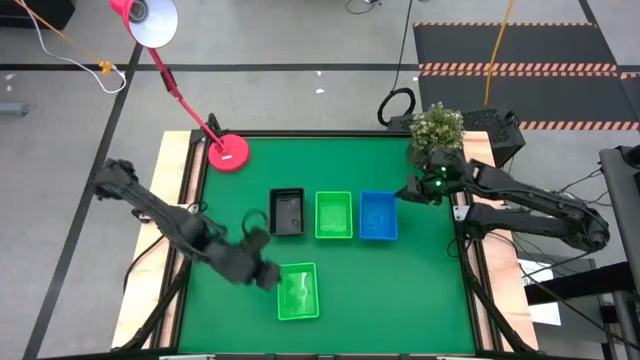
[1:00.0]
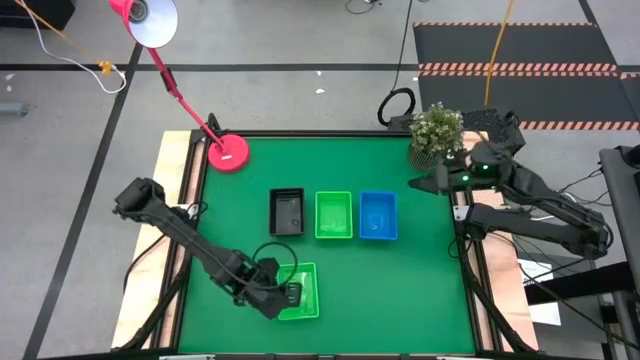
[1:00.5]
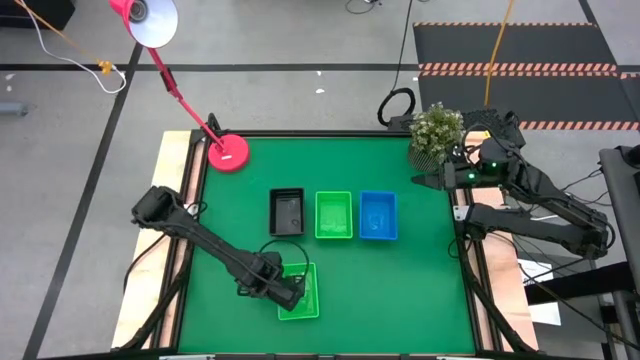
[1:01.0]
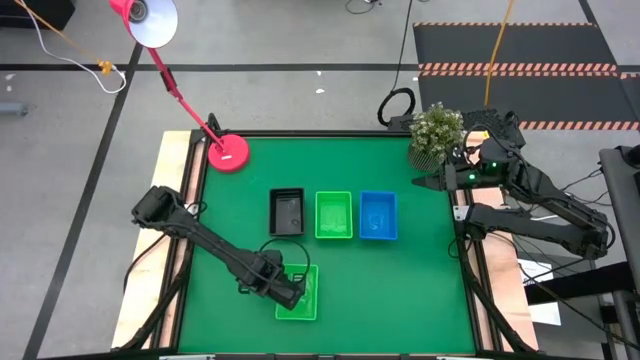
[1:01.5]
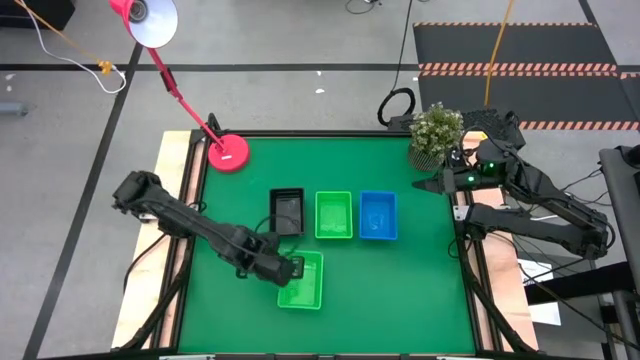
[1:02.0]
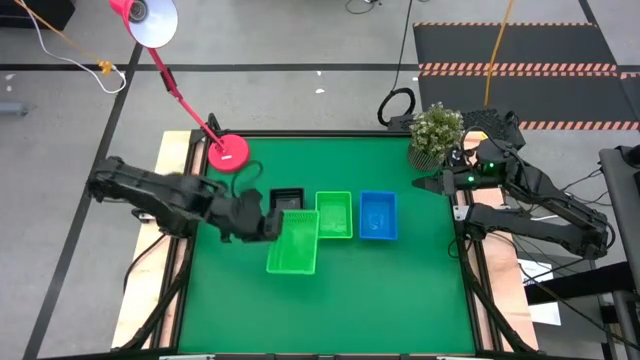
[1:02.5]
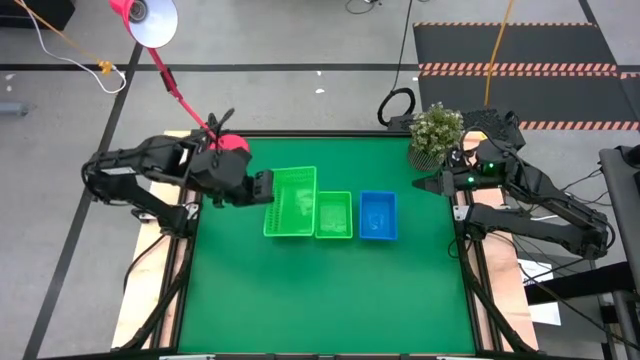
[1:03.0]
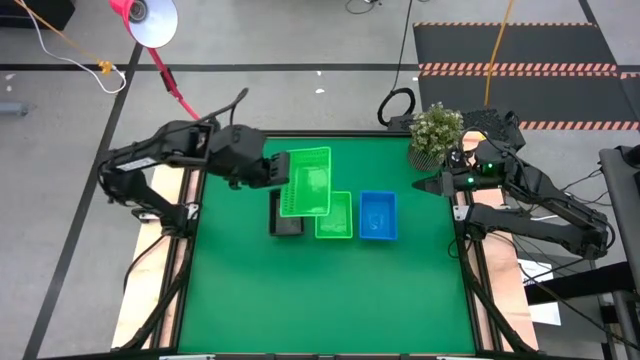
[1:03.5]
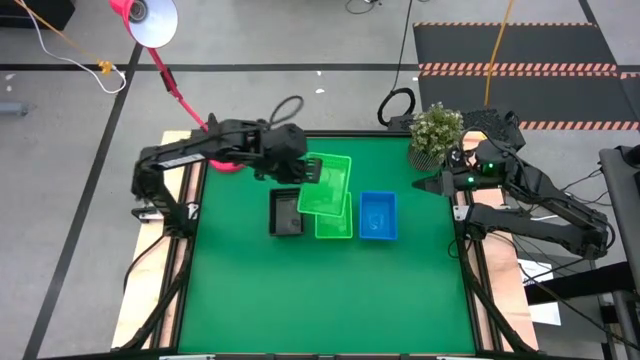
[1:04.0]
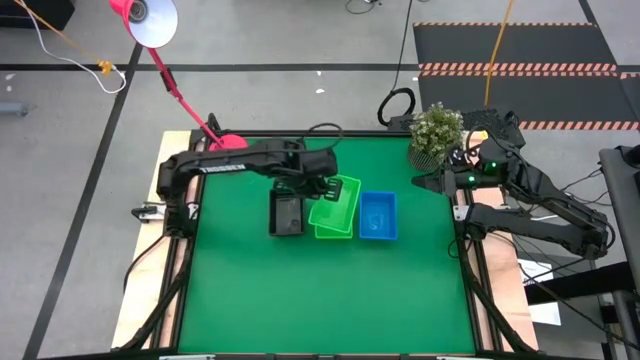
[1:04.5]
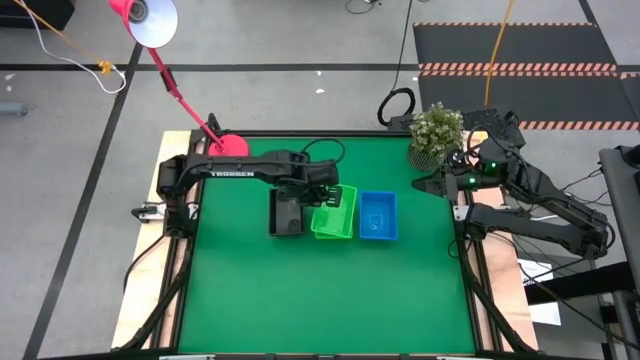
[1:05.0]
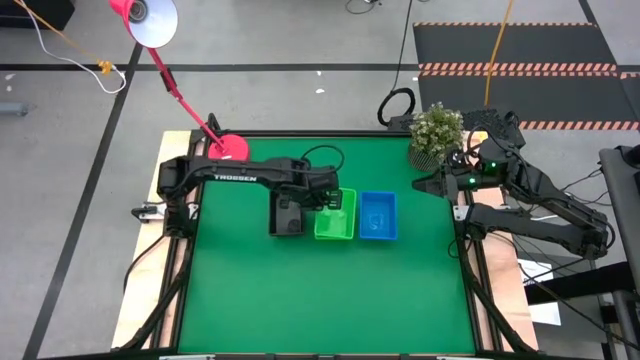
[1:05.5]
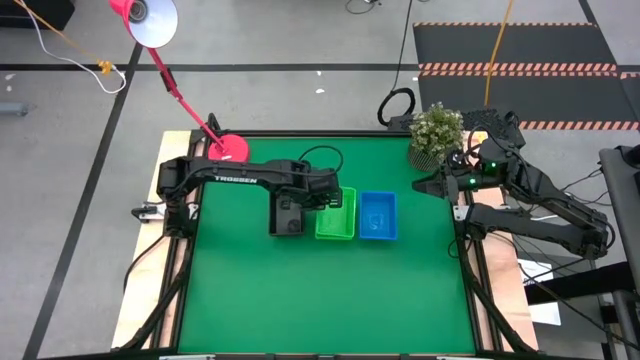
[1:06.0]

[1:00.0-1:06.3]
Stack the bottom green bin on the top green bin

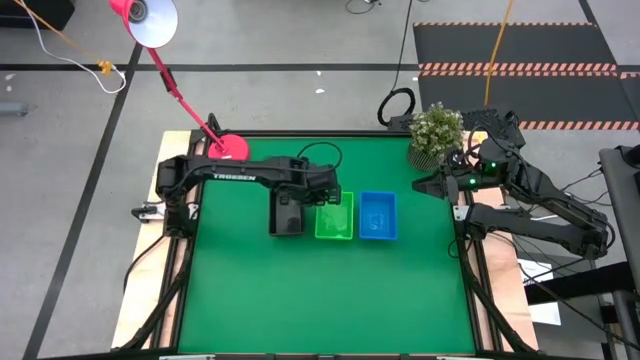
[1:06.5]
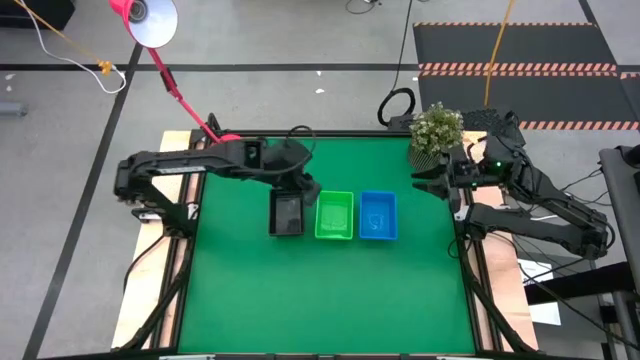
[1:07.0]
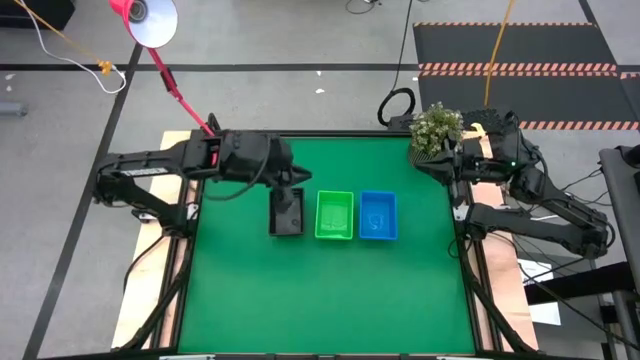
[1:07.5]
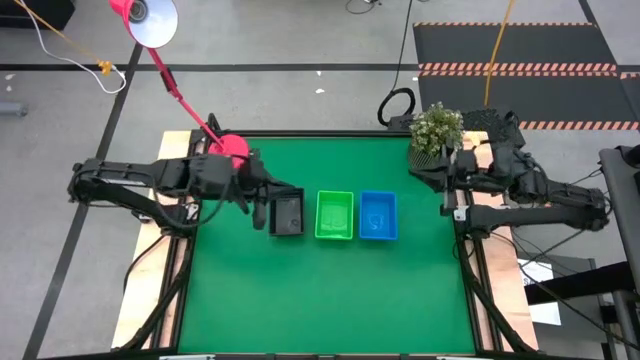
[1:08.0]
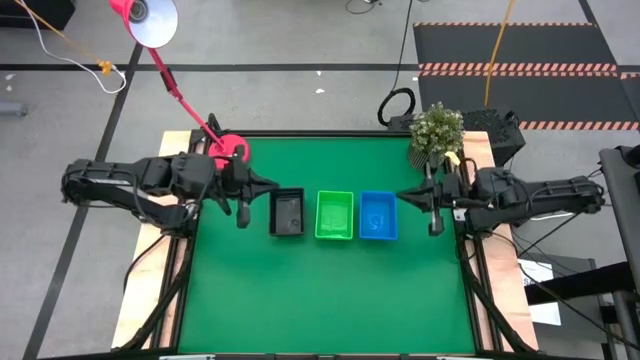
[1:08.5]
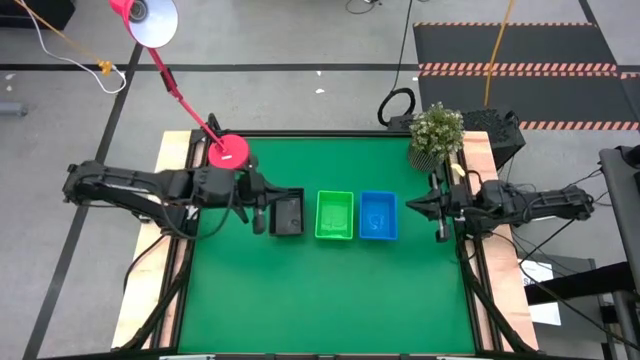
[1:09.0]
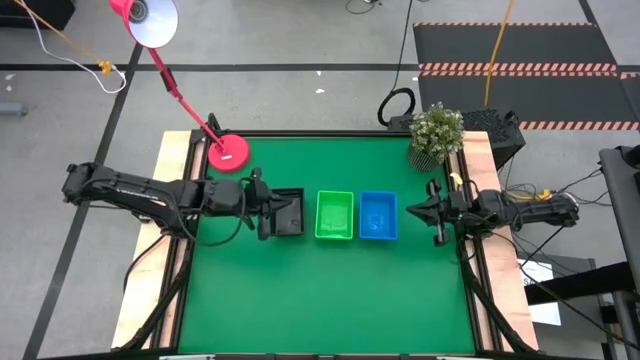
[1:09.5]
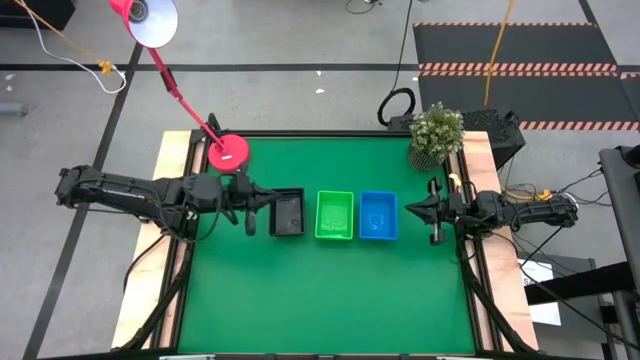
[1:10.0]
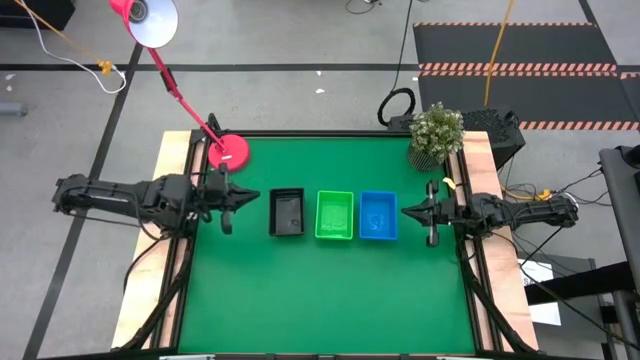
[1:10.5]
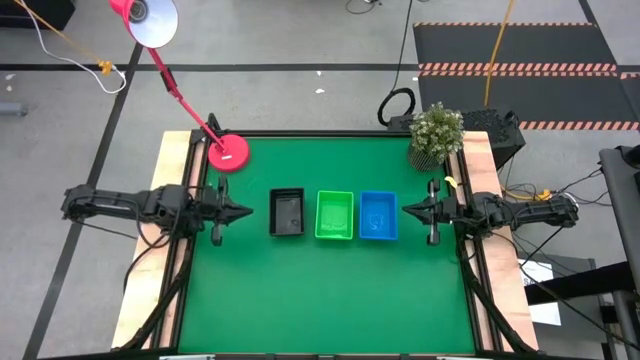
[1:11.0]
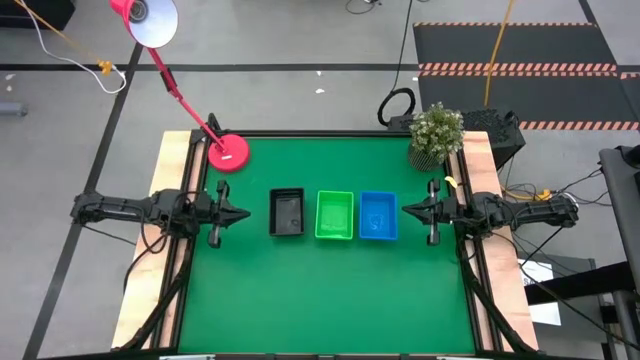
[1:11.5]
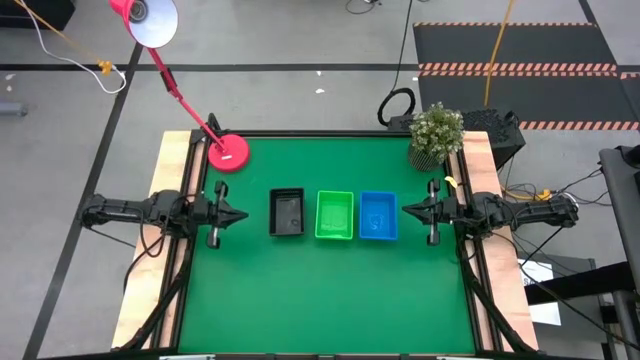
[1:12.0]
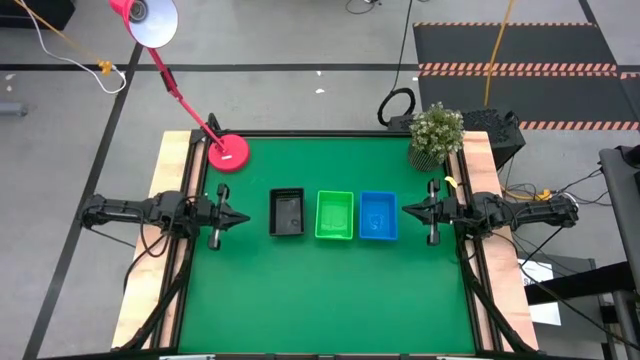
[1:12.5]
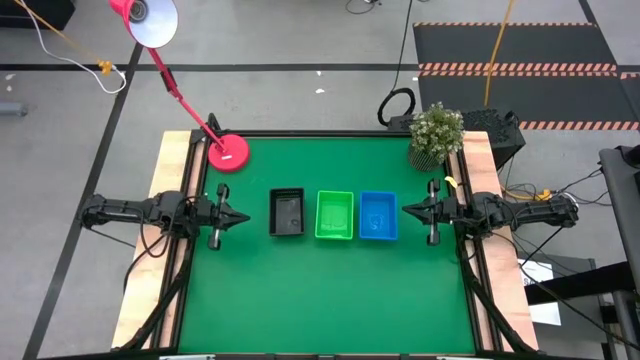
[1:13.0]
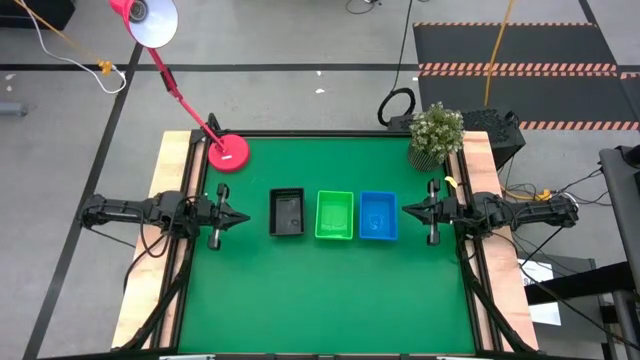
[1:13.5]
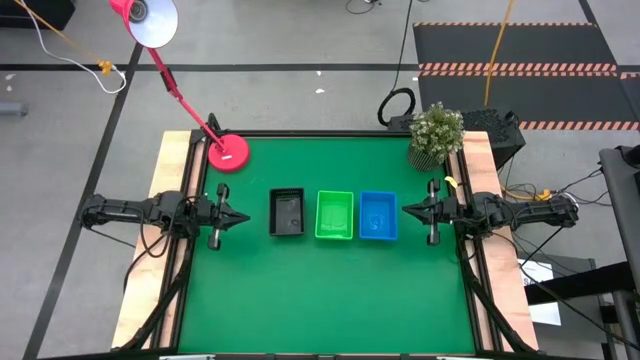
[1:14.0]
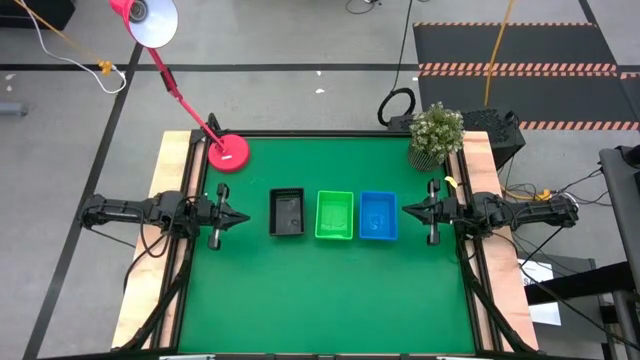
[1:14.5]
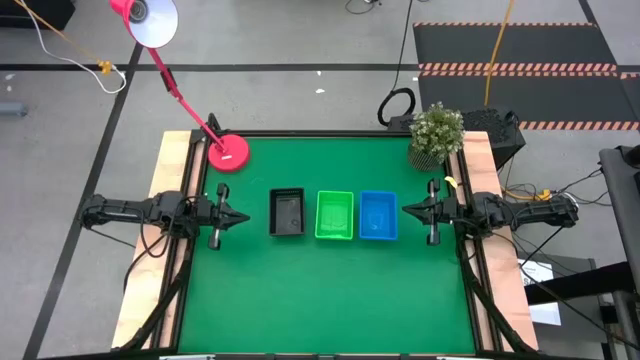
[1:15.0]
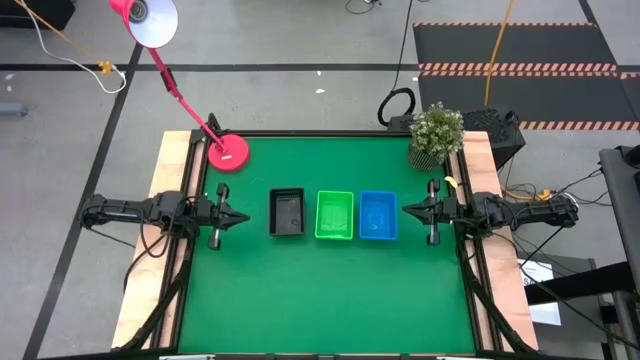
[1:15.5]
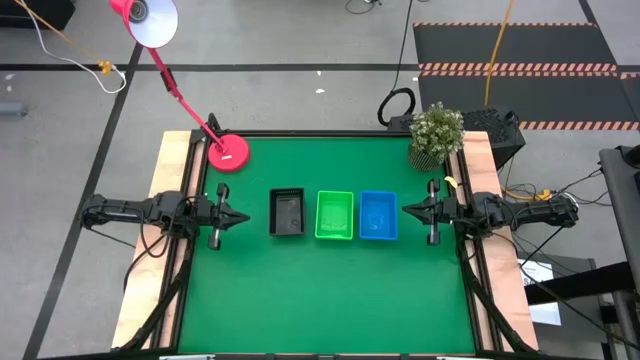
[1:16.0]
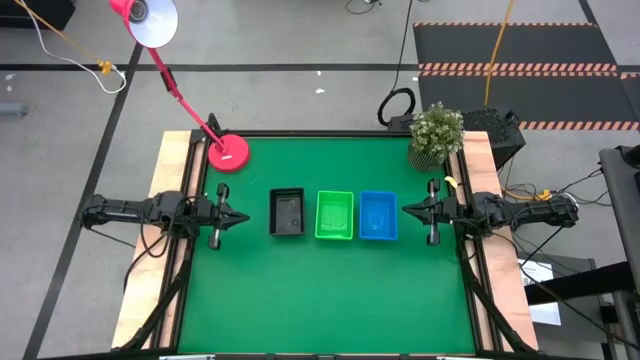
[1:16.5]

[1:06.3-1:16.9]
Return to Home Position

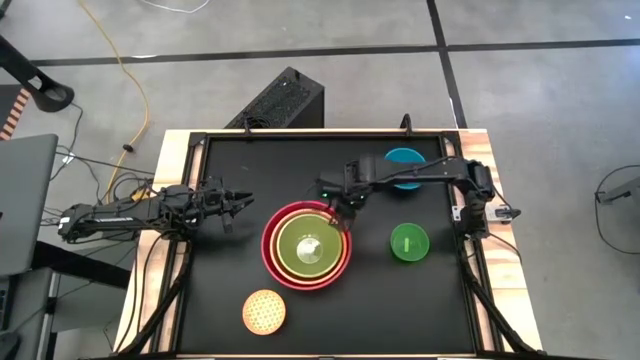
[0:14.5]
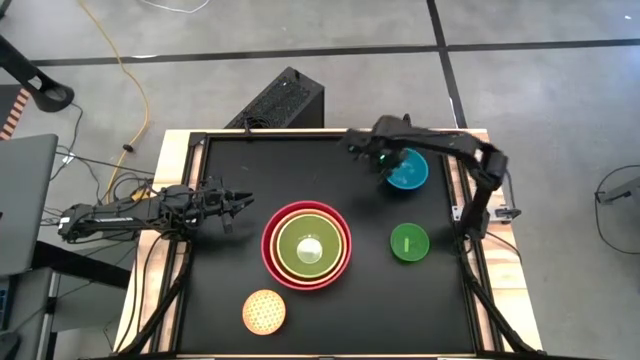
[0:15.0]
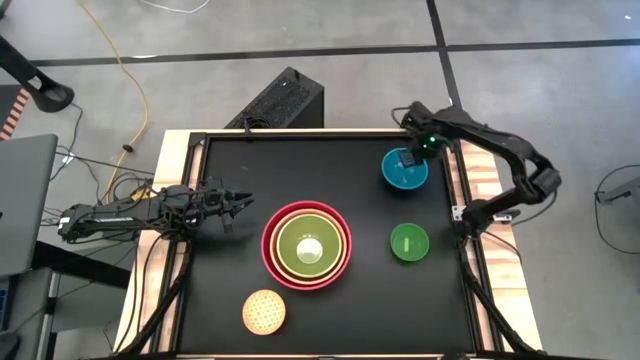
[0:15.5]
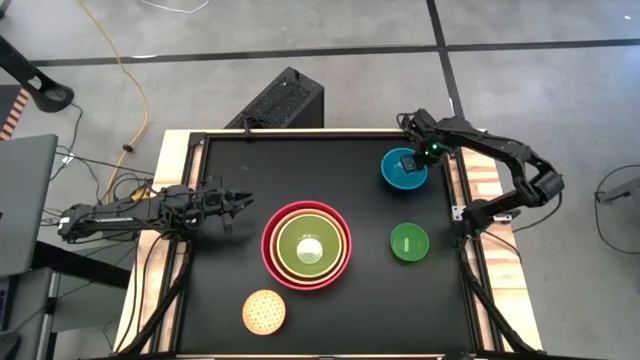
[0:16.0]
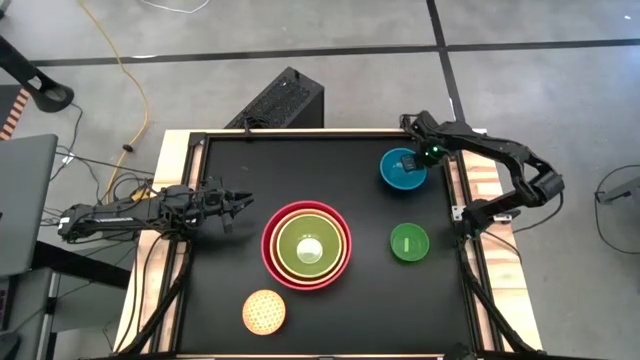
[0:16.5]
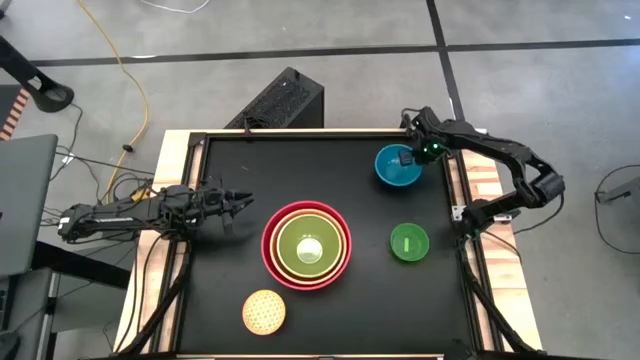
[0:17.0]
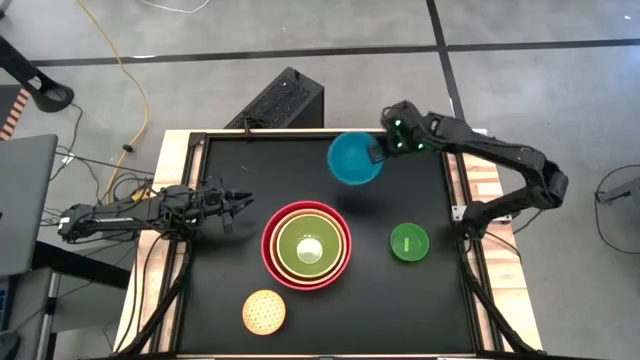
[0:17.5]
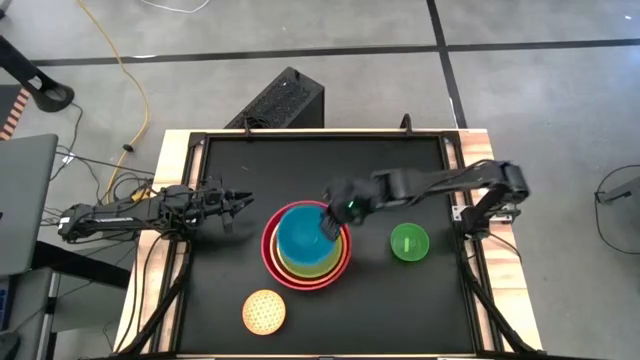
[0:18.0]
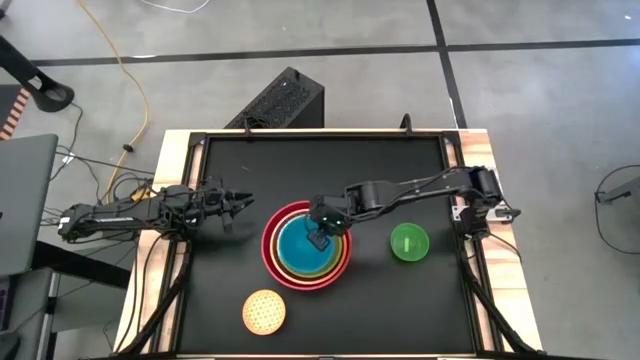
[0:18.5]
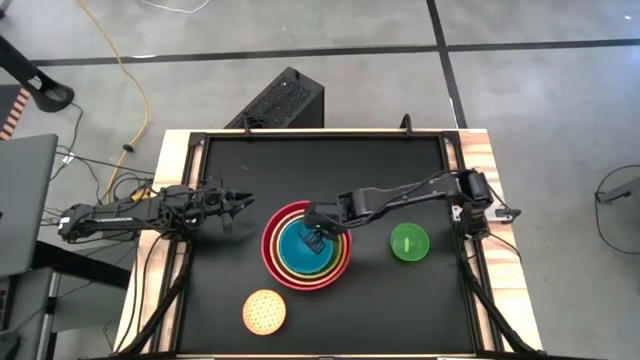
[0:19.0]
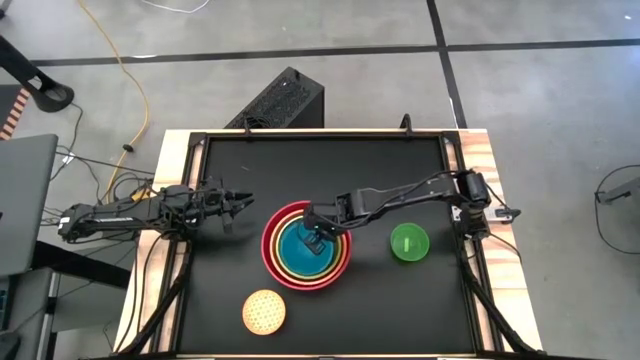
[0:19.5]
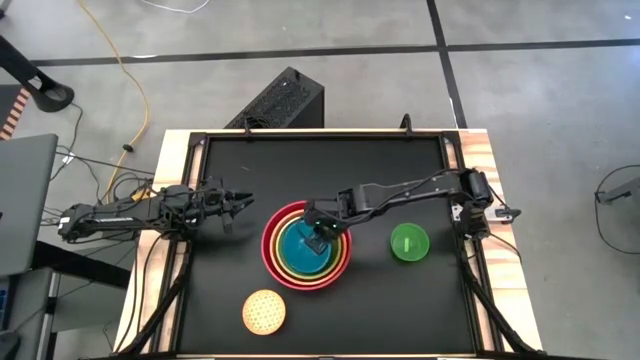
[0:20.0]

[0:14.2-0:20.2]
Stack the blue bowl on top of the light green bowl
